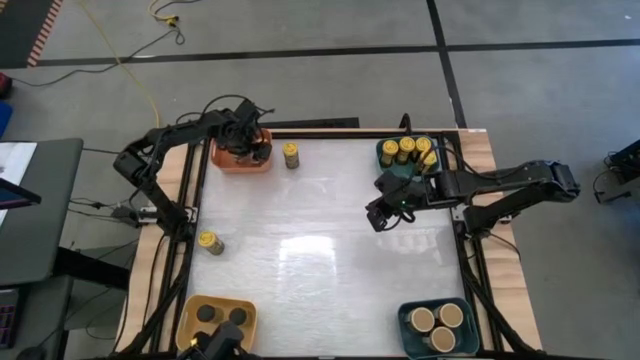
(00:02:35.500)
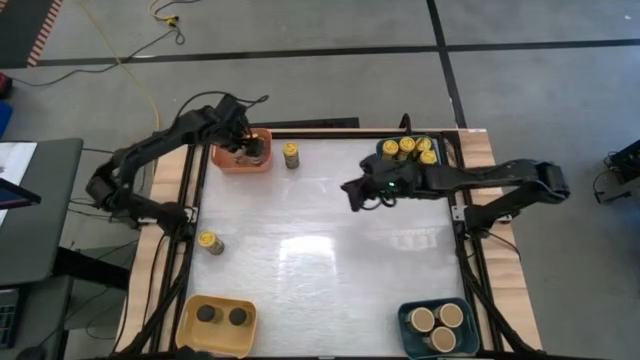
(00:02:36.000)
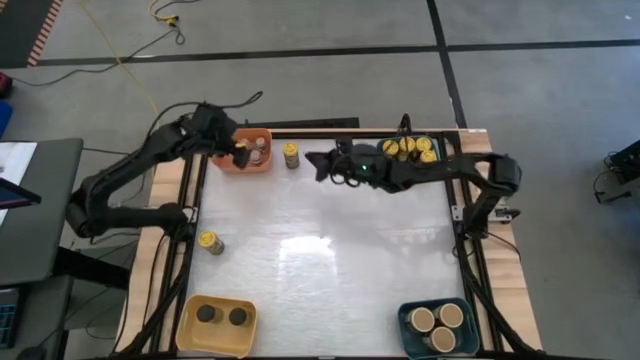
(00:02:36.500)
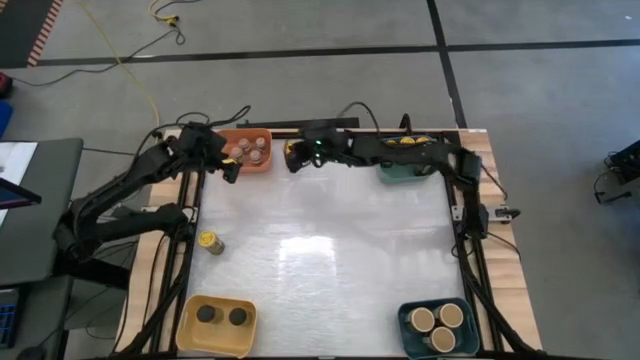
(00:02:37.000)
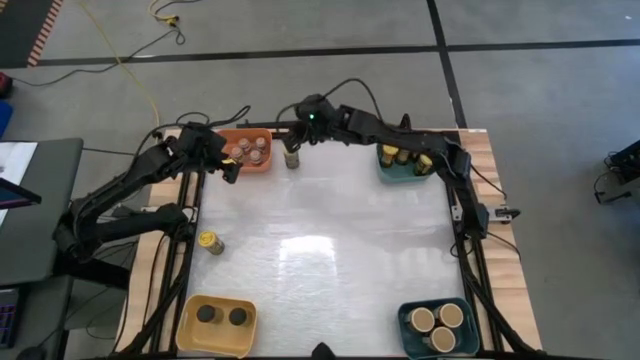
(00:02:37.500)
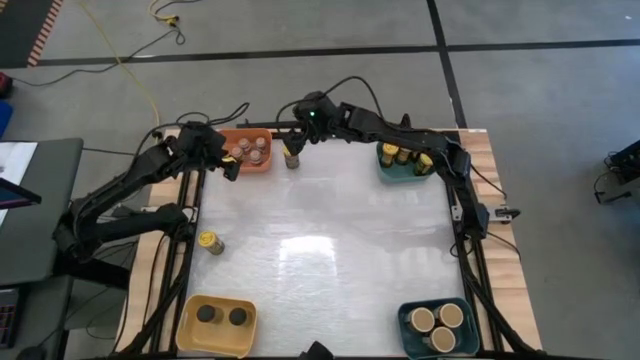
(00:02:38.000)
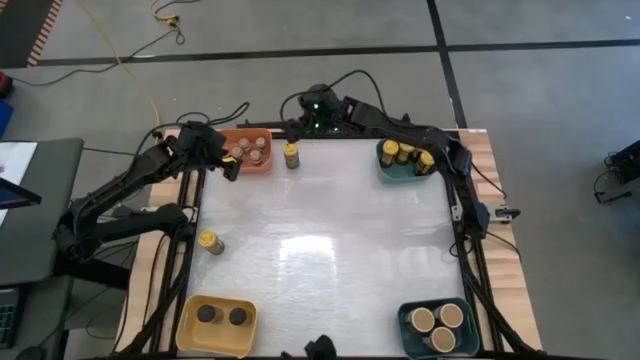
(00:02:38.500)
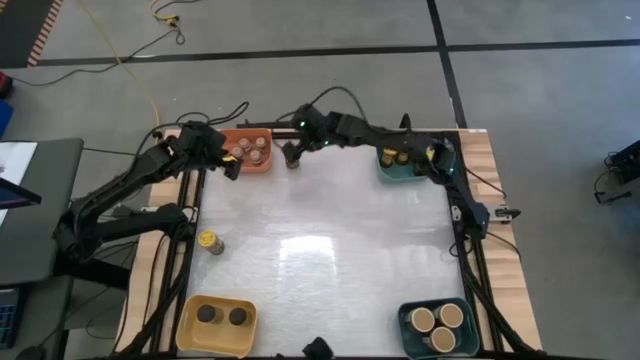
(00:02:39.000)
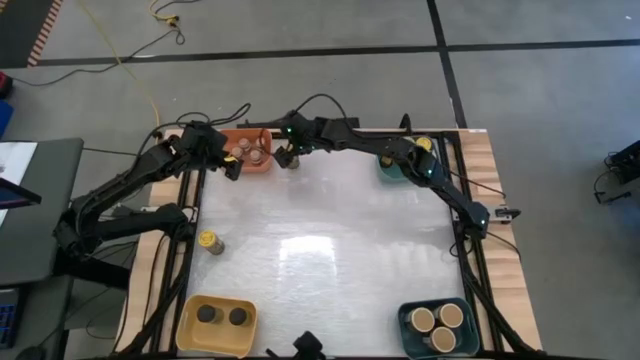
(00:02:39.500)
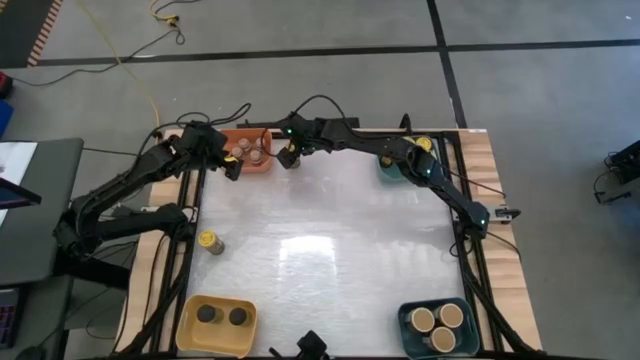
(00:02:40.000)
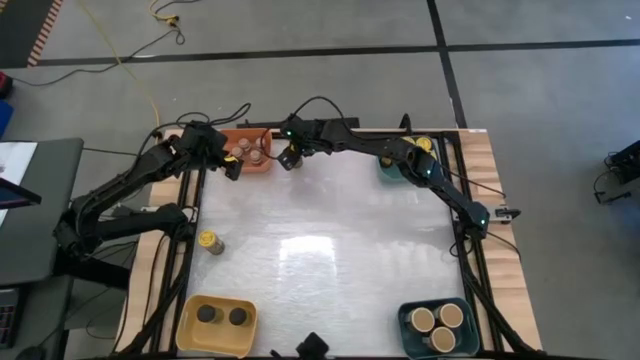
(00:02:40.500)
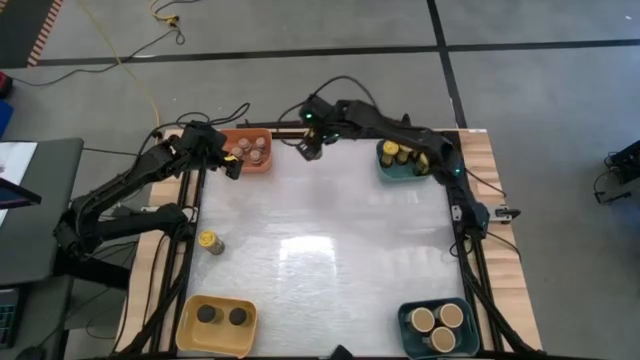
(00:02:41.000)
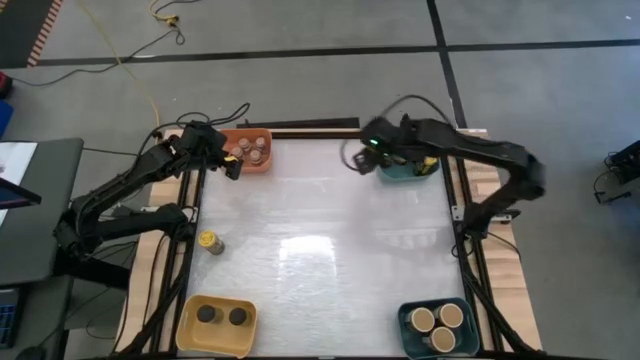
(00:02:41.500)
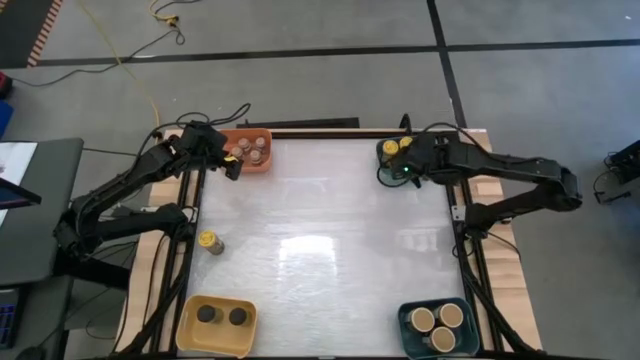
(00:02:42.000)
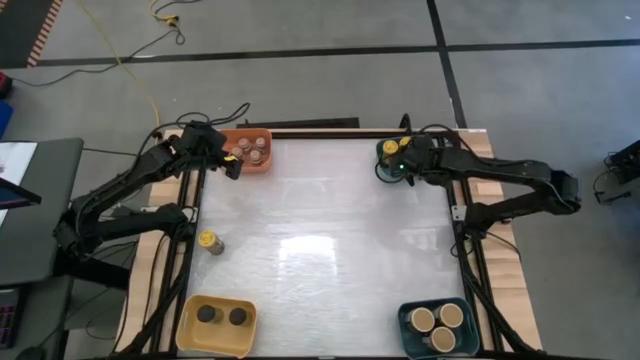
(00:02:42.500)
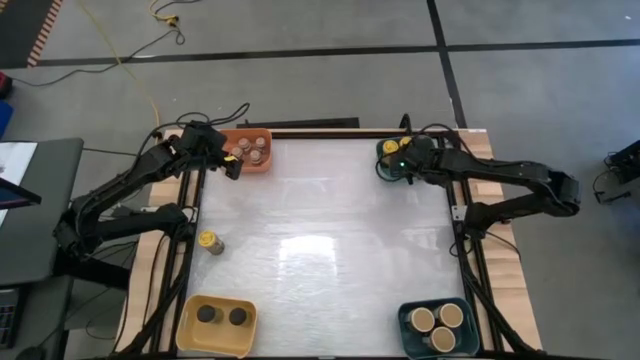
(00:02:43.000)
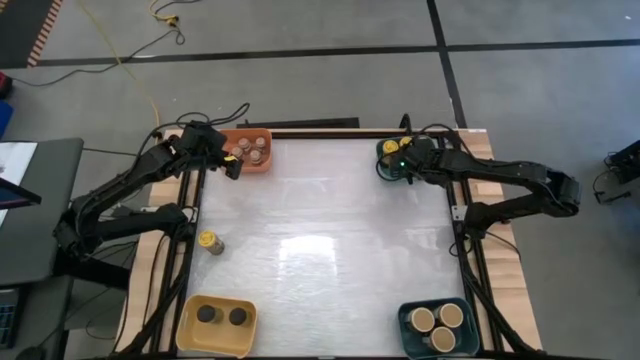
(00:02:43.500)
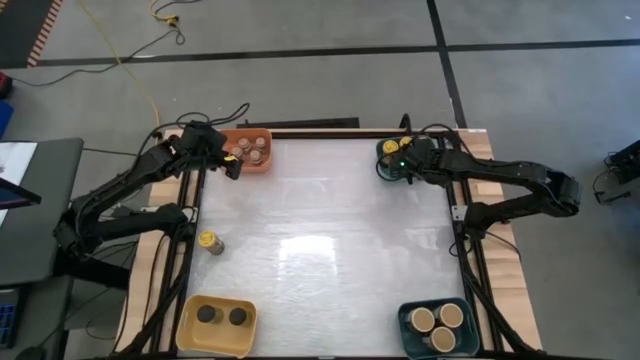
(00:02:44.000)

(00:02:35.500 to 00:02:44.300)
Task: Sort spices by type
Put the top yellow seasoning bottle into the light blue bin

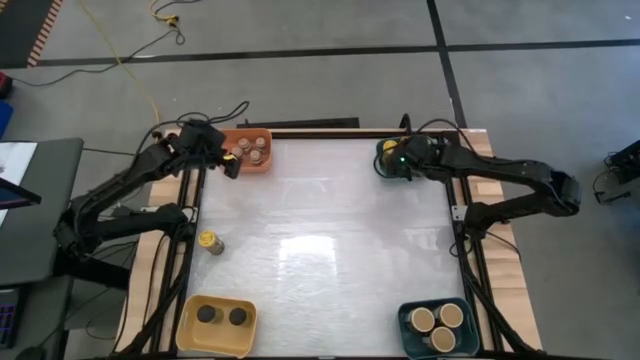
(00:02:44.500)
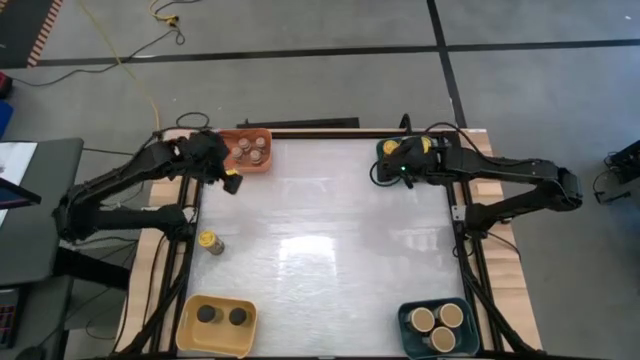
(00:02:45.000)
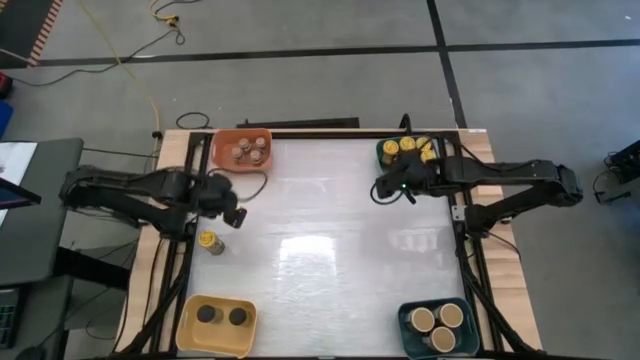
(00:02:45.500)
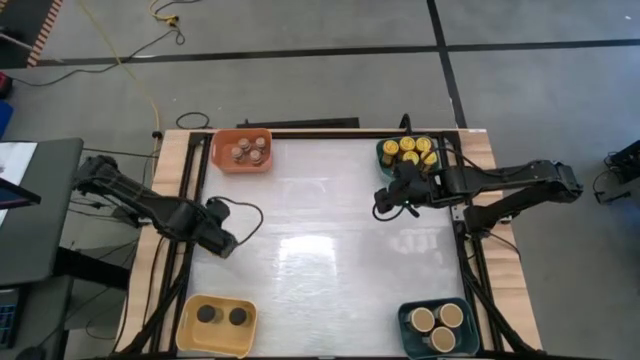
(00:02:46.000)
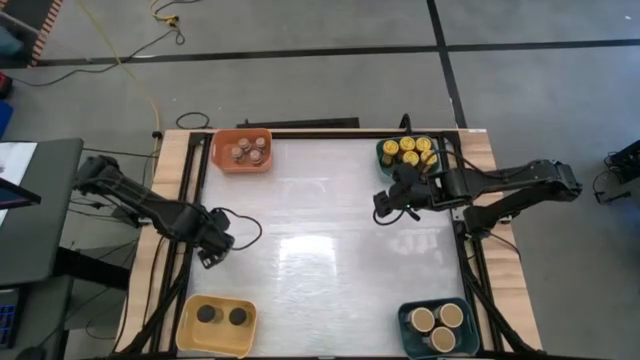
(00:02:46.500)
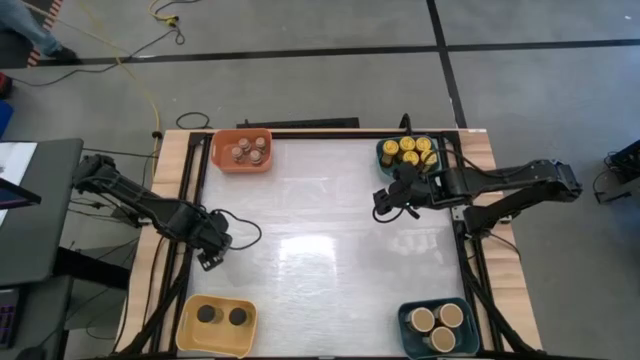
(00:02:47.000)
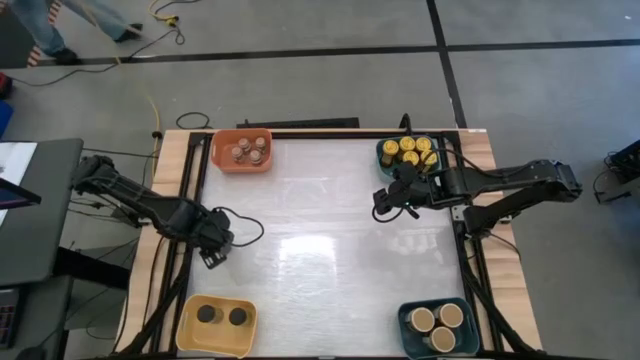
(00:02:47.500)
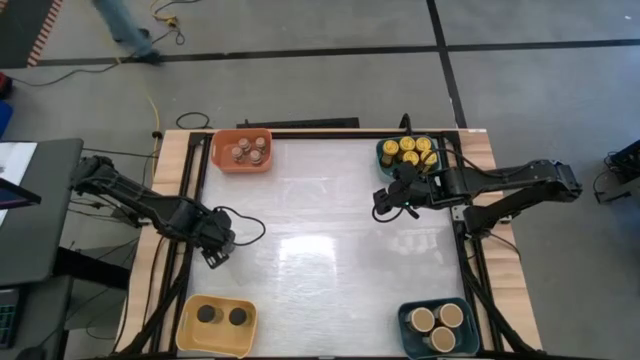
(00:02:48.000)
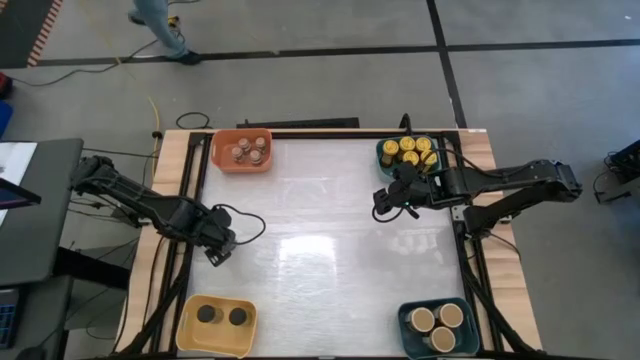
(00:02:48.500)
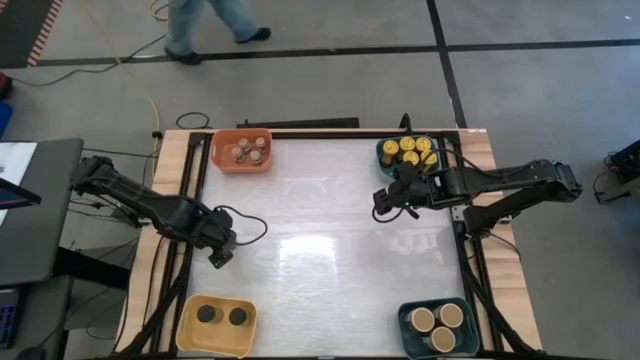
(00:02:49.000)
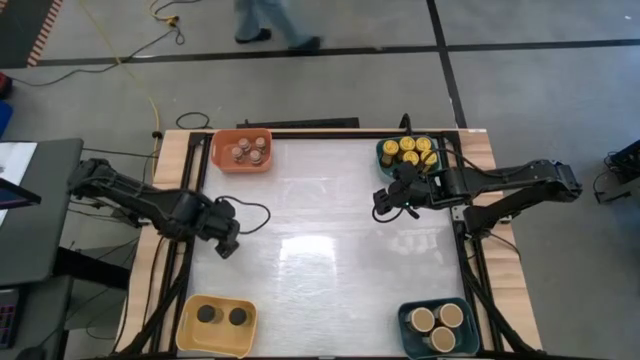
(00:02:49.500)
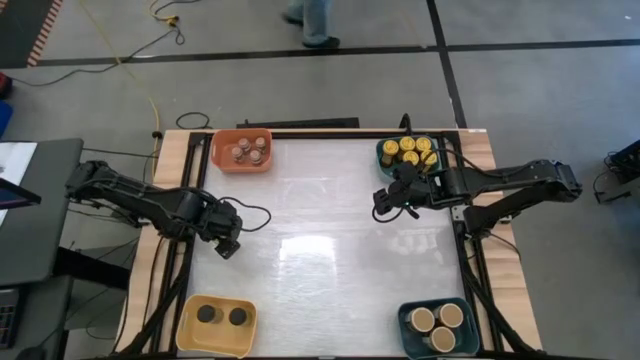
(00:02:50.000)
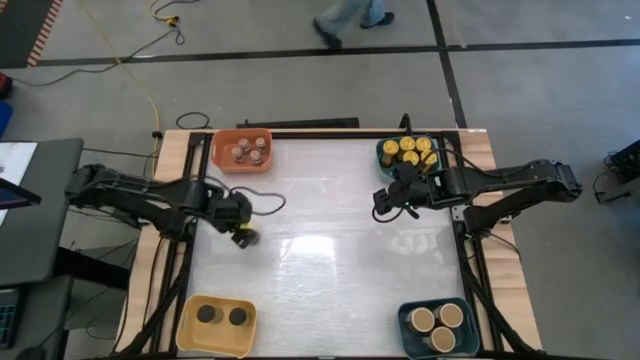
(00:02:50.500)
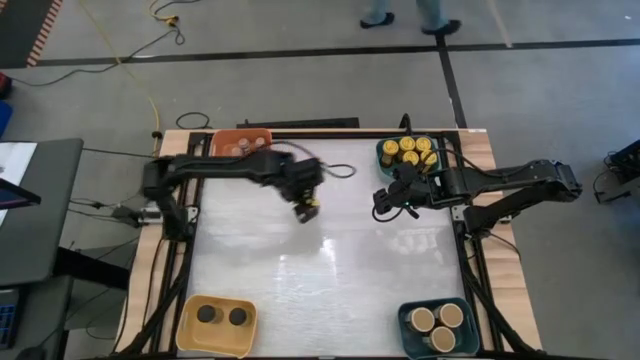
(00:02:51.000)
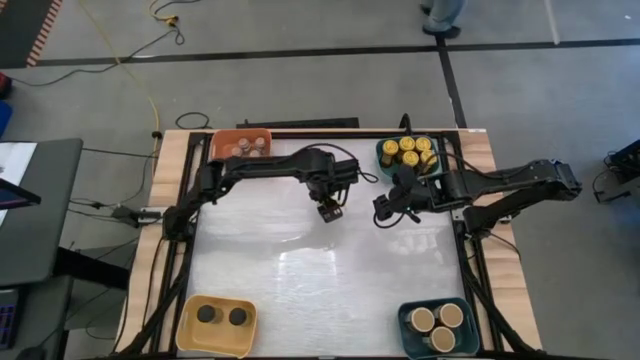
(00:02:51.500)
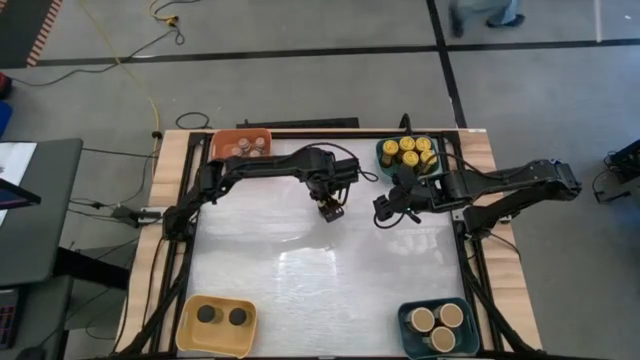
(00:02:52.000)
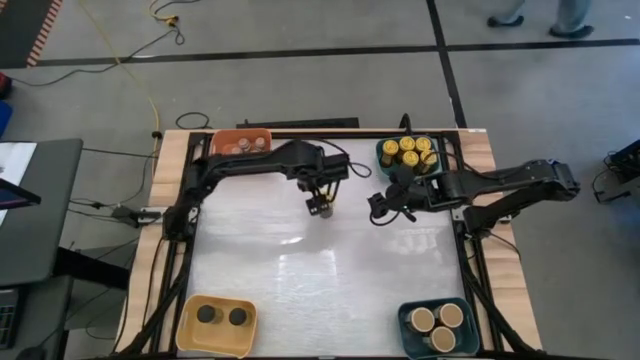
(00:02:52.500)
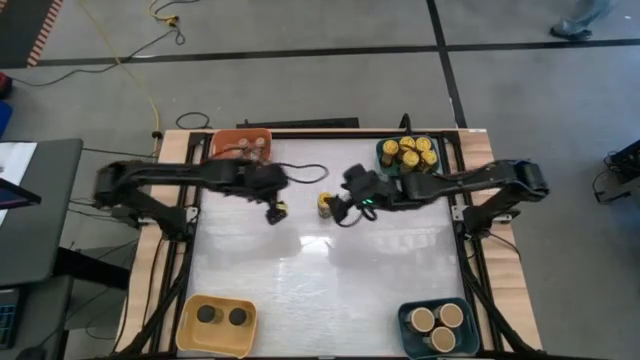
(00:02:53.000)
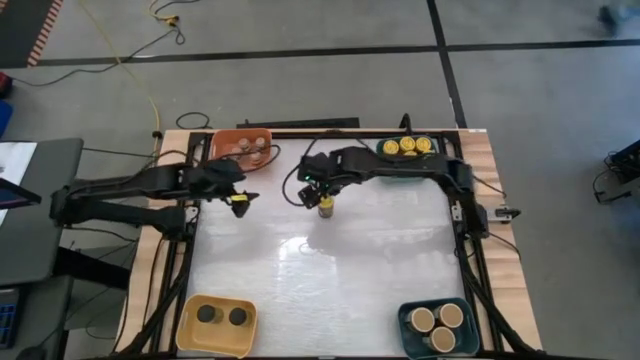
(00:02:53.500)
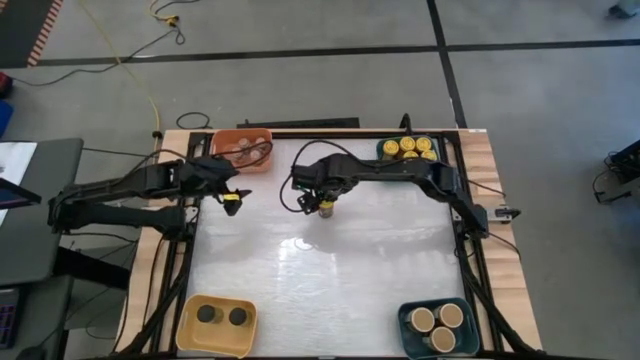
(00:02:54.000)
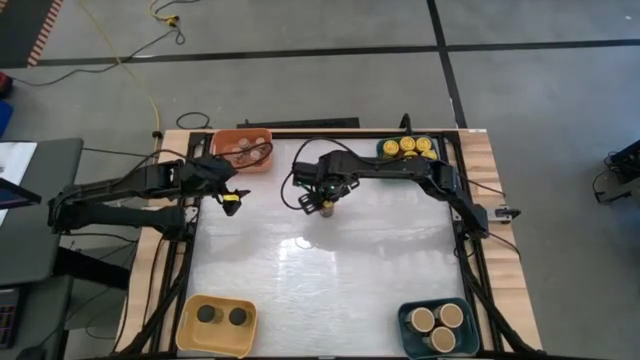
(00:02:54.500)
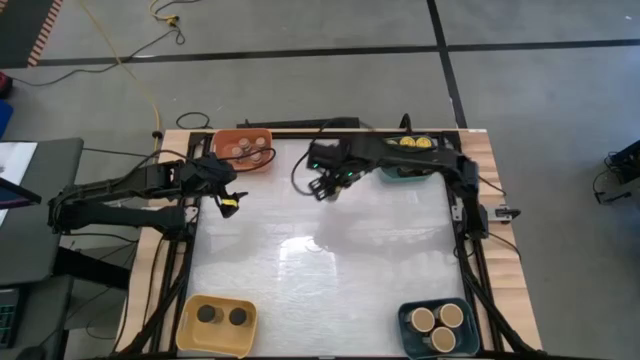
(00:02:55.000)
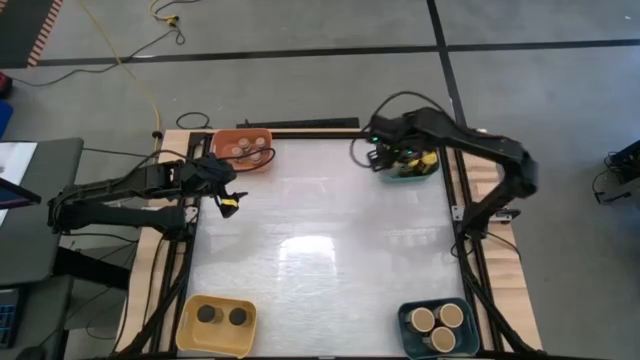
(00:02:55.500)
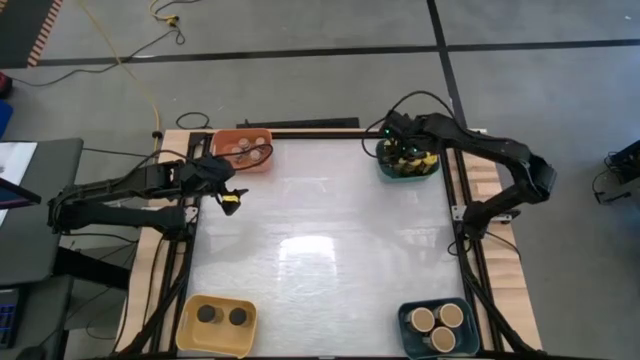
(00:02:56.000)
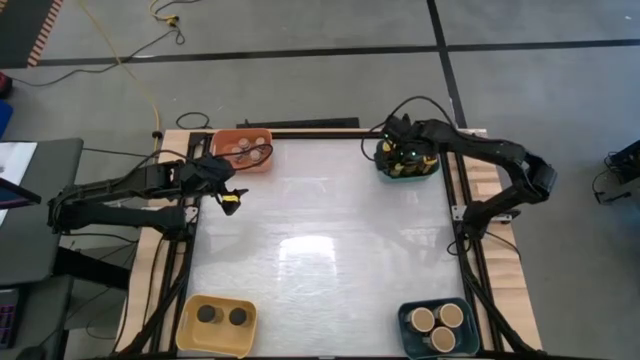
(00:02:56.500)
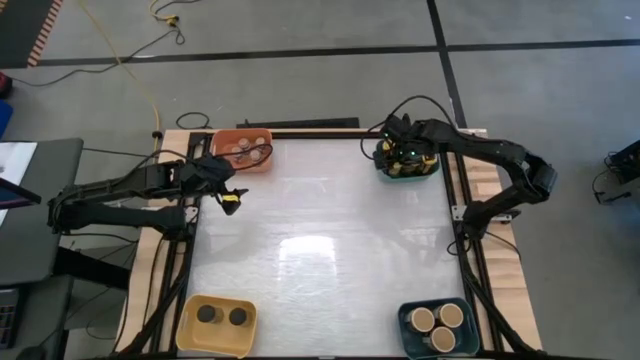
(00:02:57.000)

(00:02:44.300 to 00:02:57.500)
Put the yellow seasoning into the top teal light blue bin
